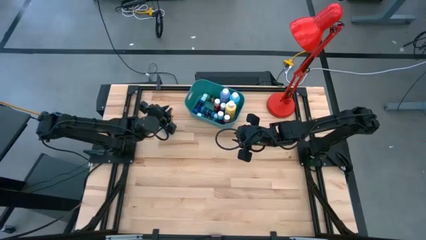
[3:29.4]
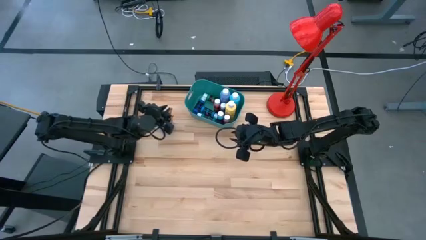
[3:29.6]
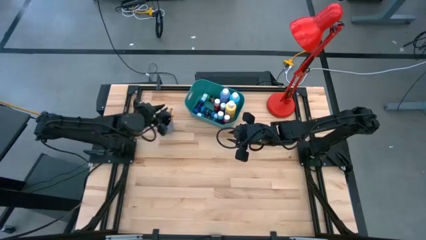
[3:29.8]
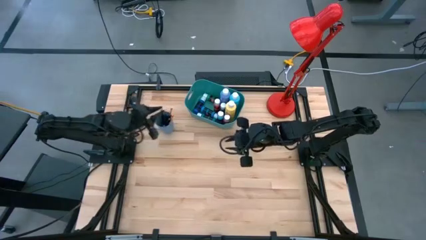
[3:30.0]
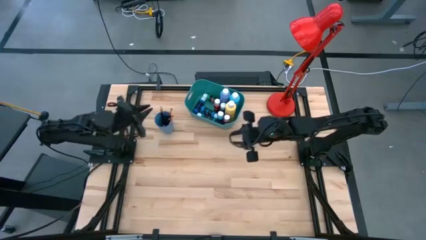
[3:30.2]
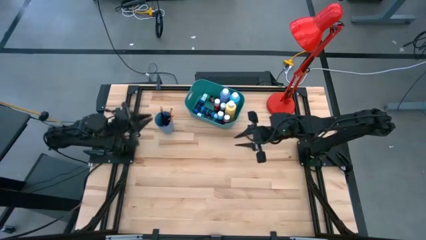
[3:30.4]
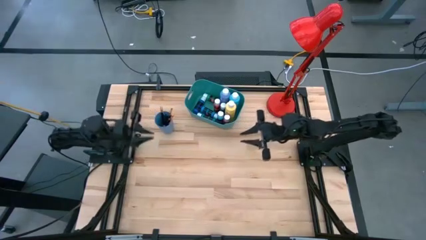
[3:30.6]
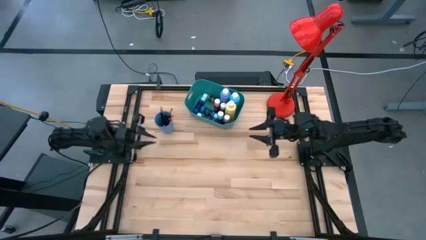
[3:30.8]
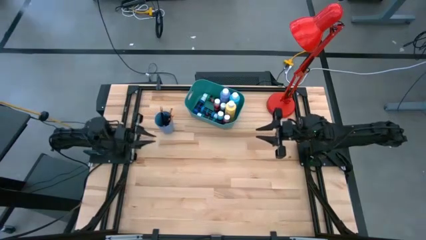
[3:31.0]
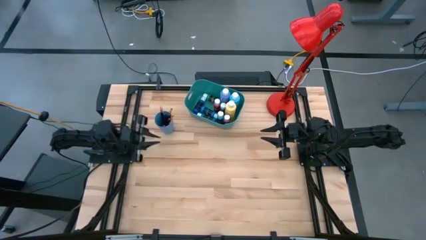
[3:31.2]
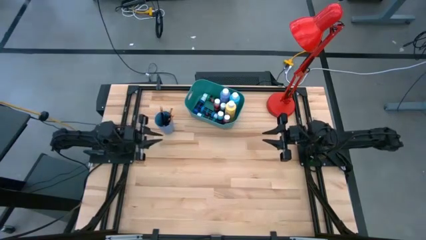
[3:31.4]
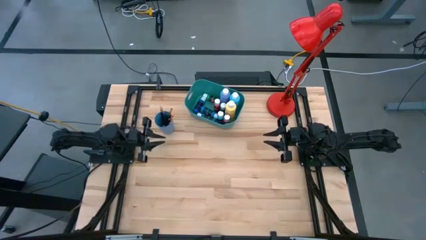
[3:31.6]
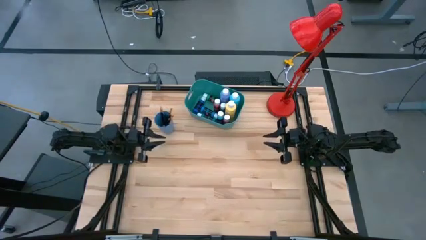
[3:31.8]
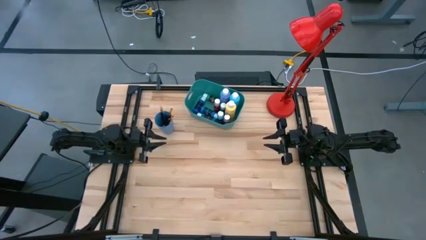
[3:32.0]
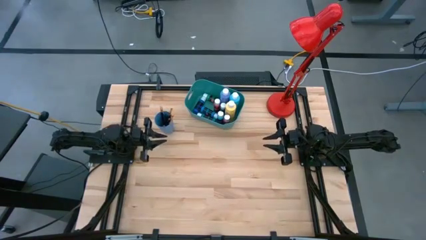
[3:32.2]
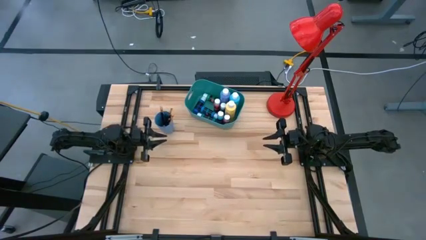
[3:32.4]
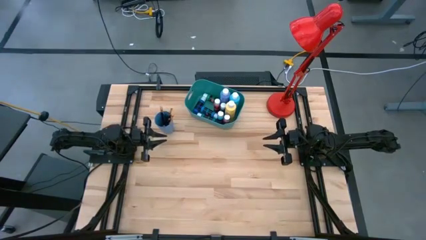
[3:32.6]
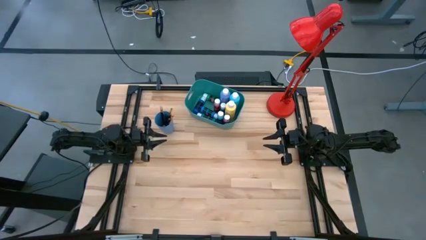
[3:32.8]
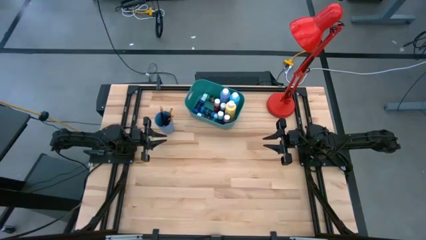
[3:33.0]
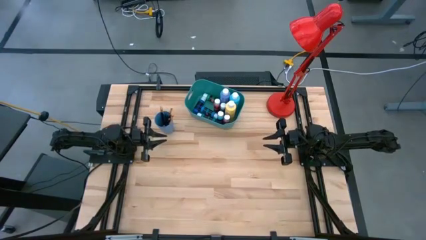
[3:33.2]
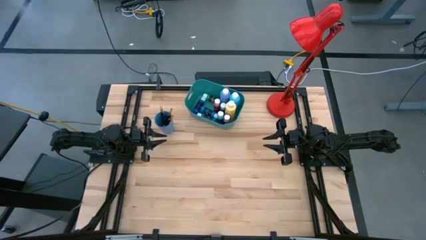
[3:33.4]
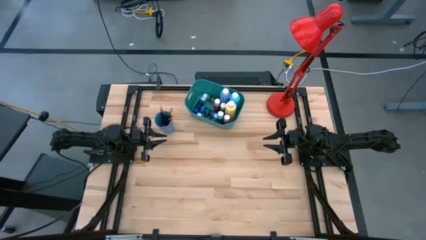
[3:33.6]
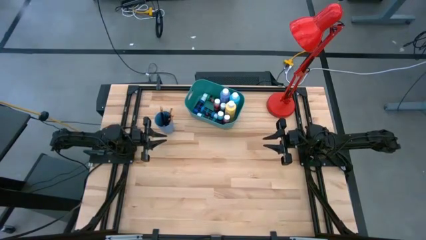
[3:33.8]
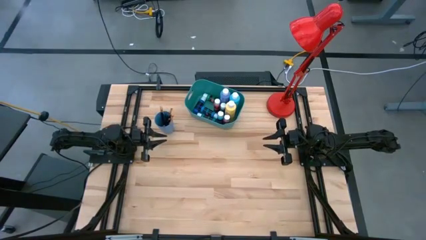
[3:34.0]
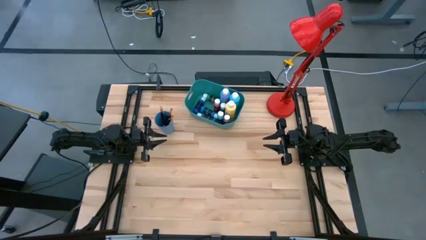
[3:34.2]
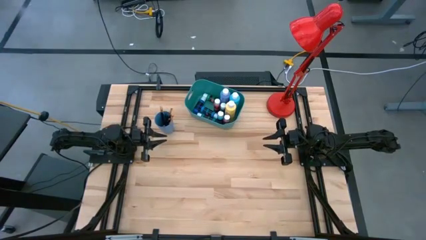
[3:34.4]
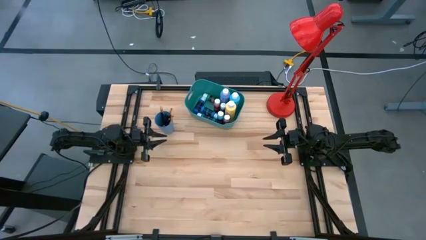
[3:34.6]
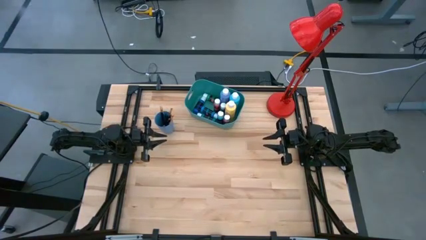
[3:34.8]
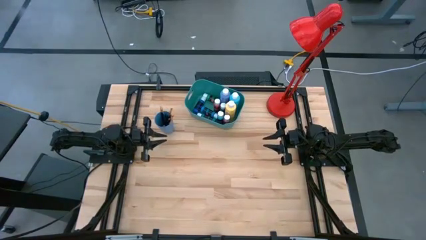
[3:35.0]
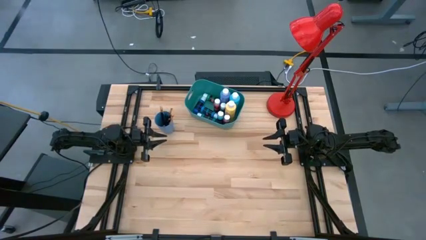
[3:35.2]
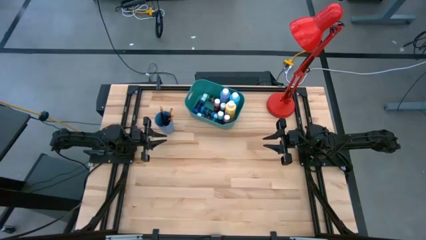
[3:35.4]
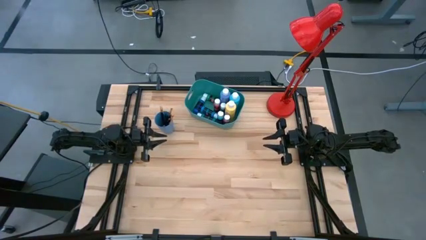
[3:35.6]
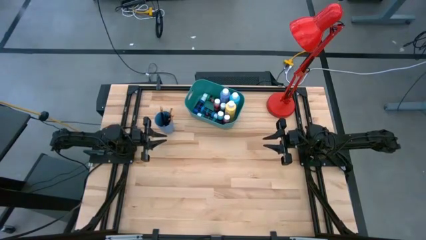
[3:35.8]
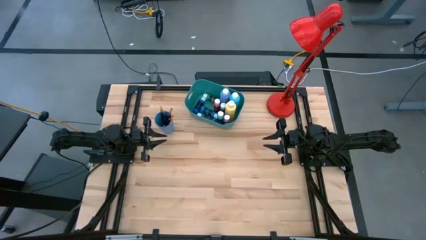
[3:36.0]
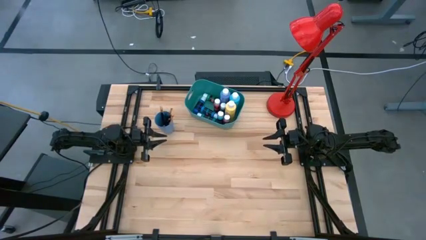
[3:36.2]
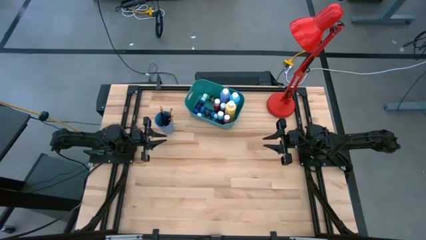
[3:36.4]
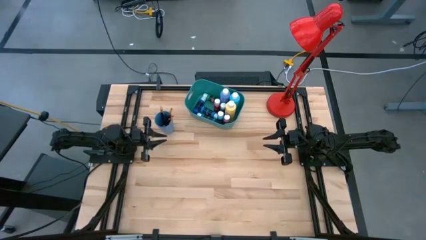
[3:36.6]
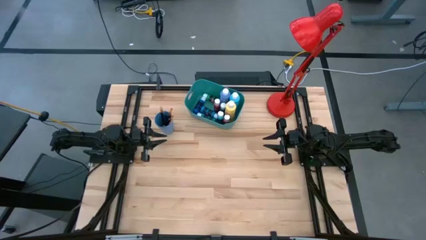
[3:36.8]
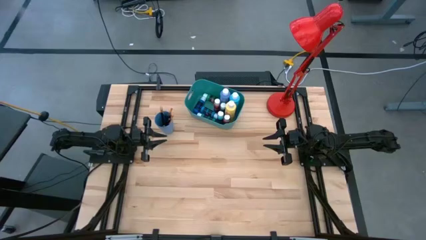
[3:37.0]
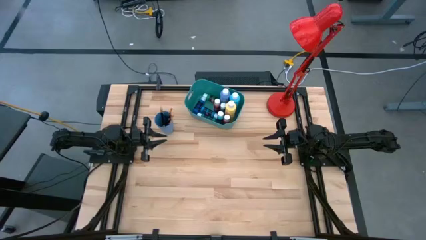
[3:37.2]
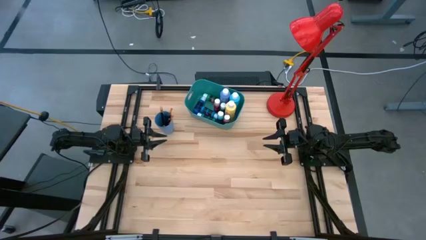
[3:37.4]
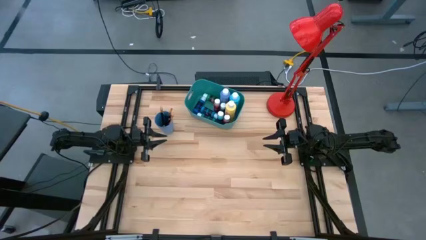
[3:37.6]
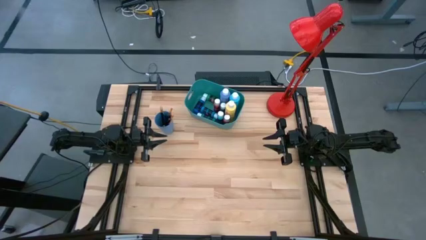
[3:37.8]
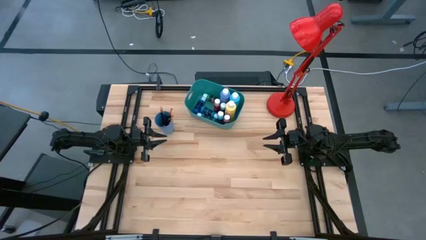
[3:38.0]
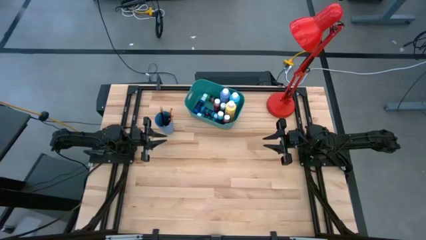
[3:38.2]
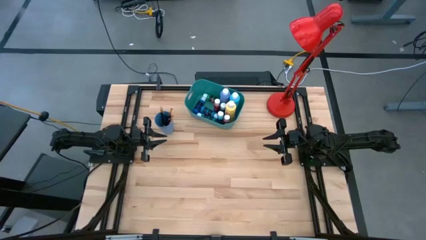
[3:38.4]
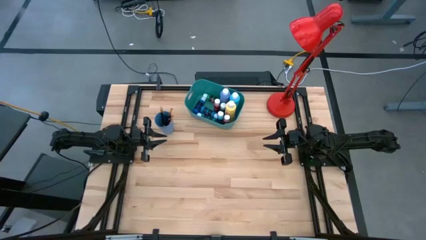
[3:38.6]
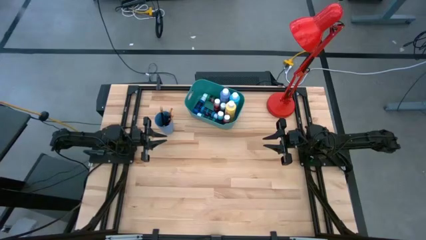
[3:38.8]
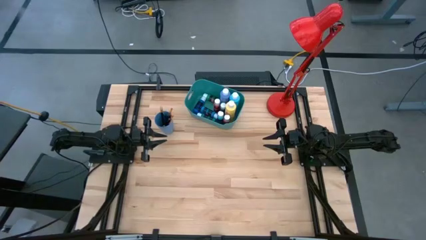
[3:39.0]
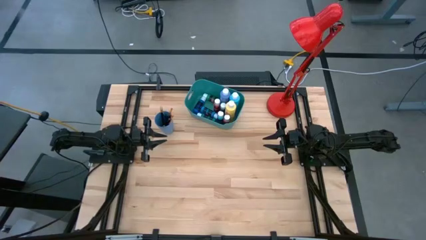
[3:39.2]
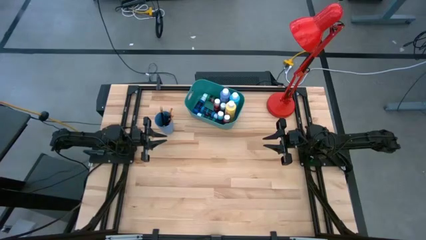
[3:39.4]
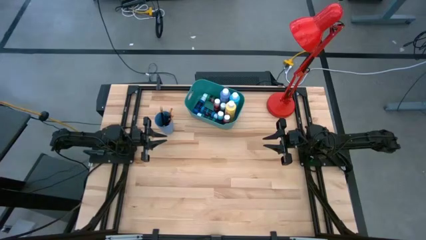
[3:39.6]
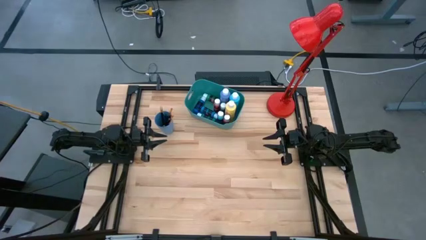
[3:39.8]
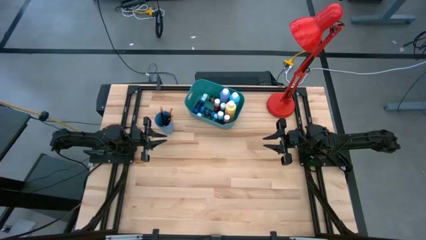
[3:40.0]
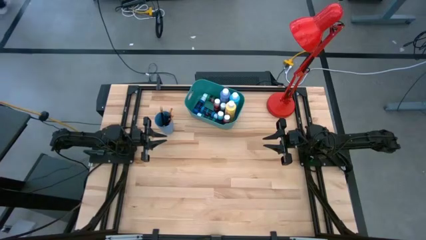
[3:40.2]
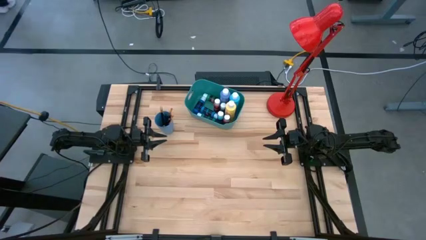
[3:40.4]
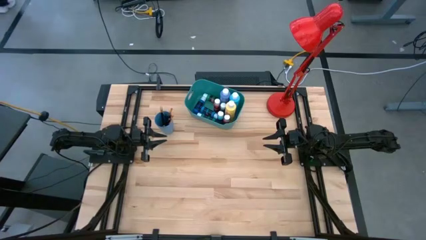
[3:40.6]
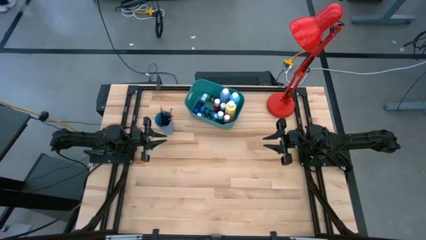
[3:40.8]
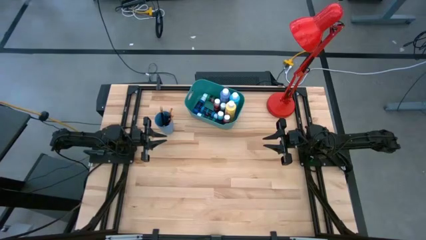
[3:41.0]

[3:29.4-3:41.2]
Task: Pick & Place Paint Supplies
Return to Home Position

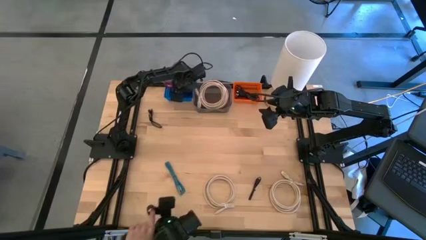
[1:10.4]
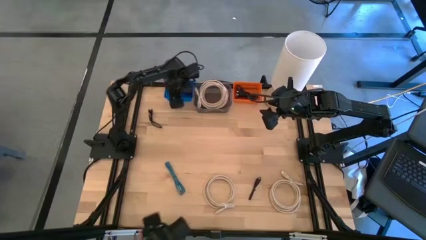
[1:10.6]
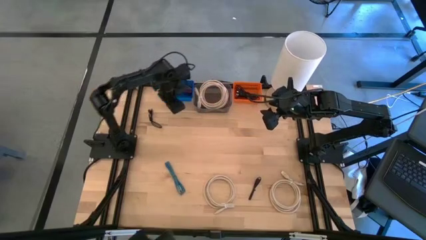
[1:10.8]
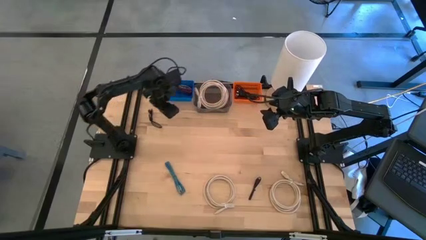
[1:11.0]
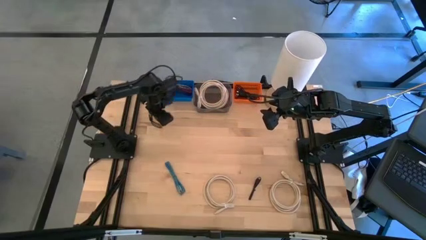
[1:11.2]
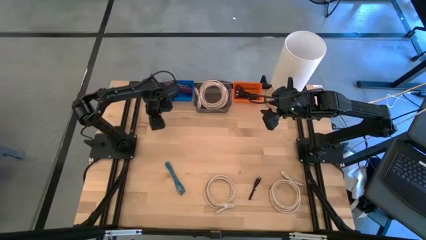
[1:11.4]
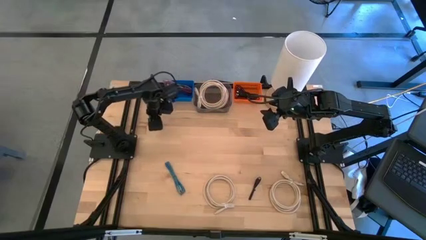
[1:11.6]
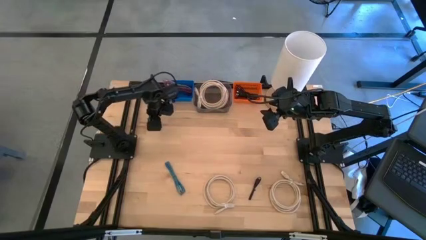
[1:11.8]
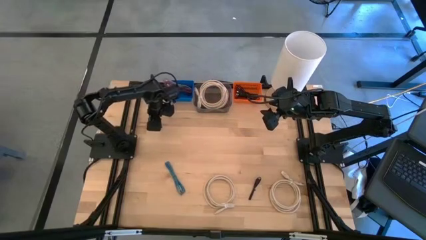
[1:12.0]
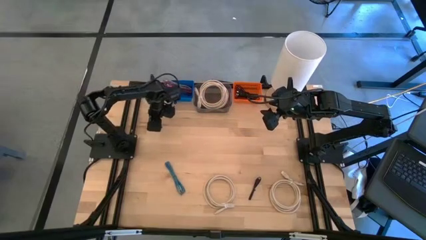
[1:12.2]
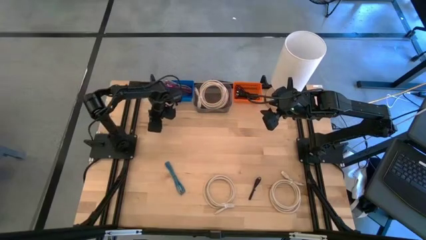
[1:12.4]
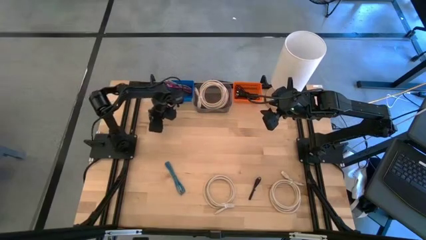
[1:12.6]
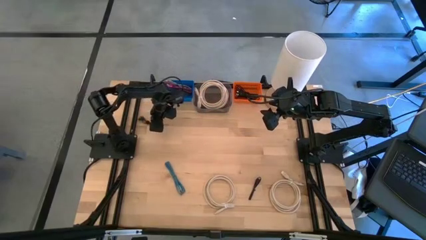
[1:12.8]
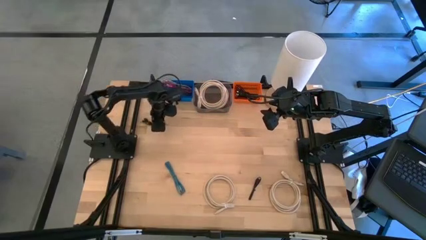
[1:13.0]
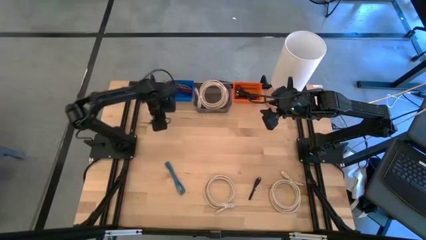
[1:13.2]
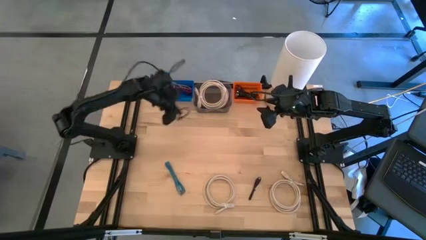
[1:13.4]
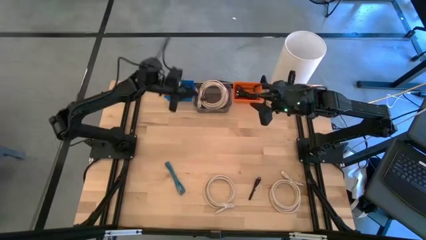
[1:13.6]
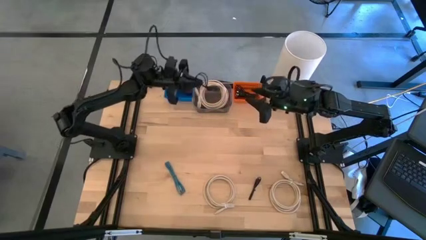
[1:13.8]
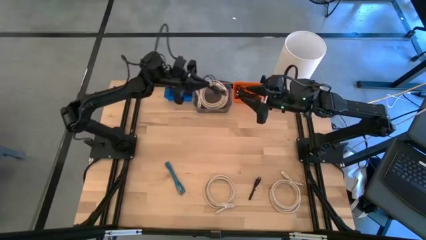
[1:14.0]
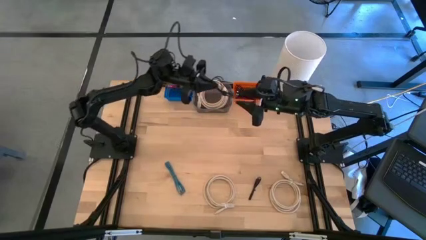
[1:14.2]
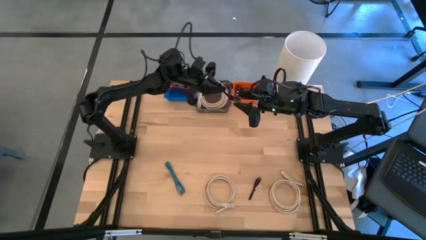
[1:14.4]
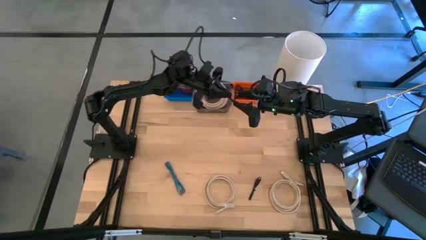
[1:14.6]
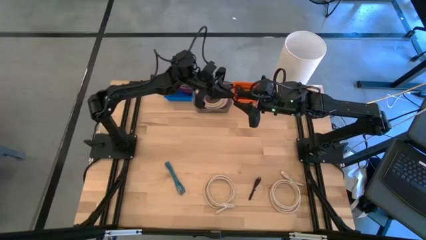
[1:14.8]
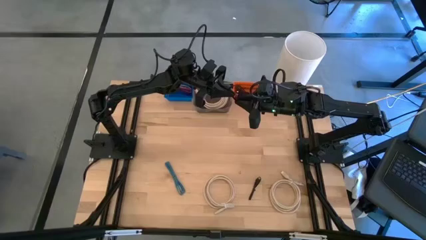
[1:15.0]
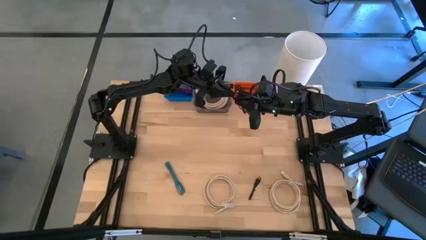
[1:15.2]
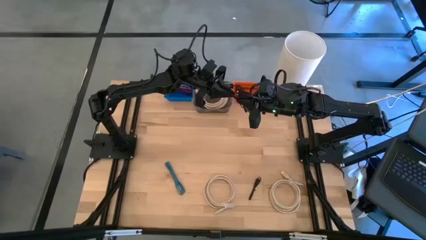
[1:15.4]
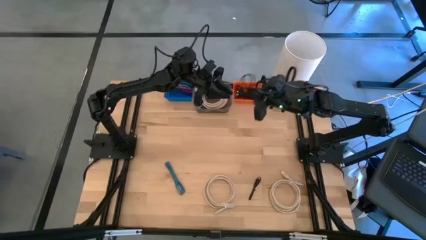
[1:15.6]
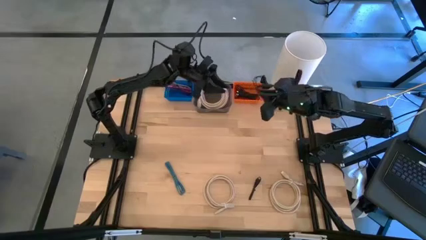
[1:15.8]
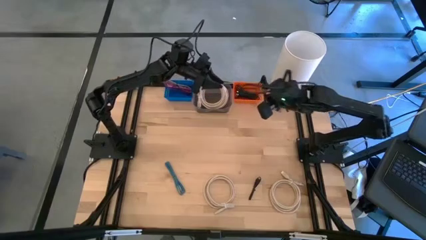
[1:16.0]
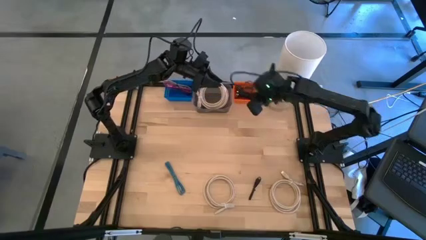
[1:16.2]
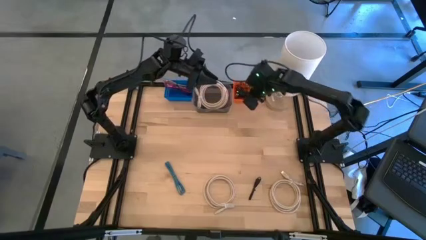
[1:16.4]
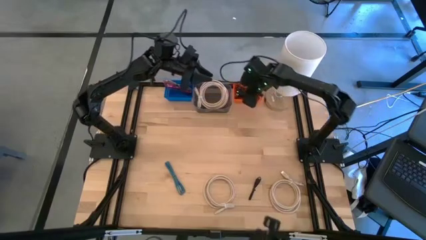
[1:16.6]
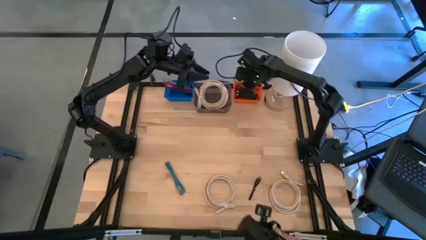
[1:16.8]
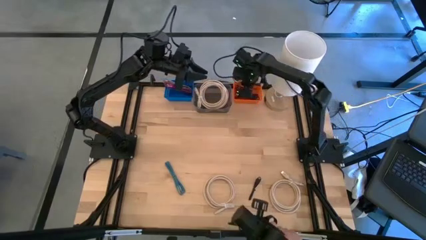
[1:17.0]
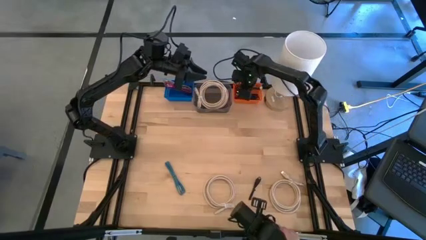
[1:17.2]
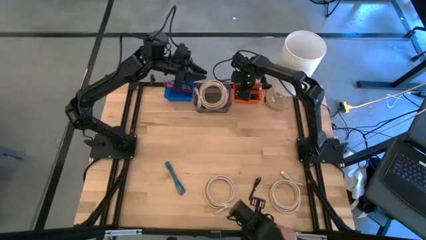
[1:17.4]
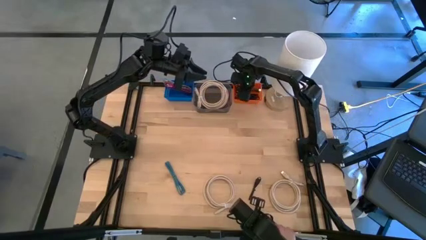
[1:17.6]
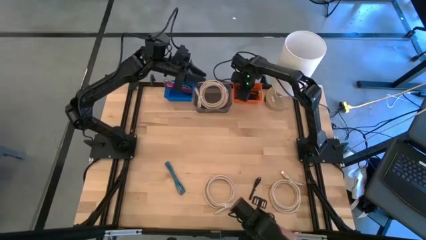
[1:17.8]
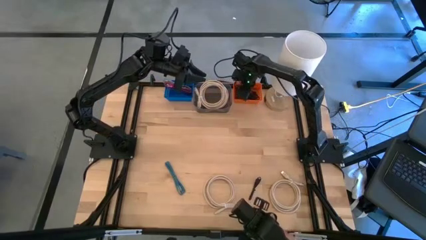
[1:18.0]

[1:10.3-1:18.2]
Task: Pick & Place USB Port
Put the black charger cable into the orange bin
